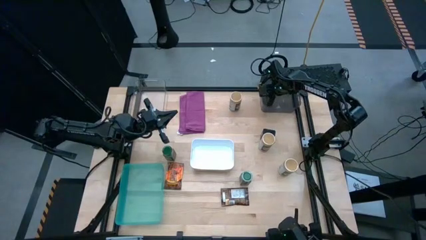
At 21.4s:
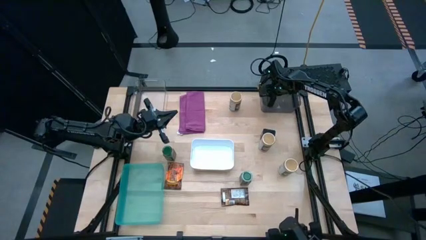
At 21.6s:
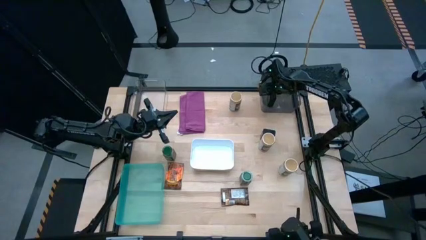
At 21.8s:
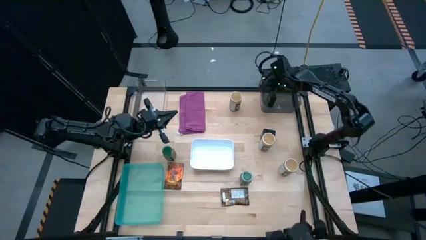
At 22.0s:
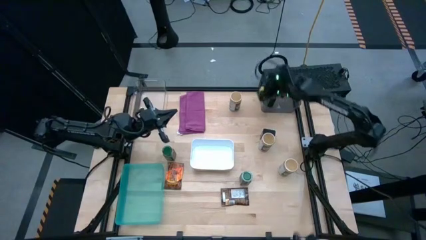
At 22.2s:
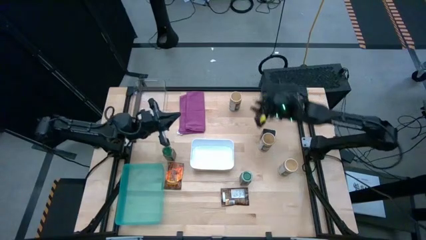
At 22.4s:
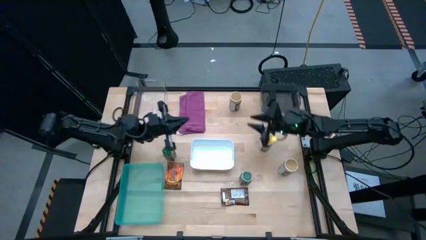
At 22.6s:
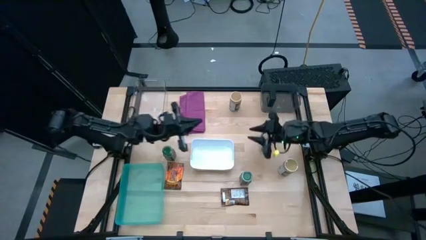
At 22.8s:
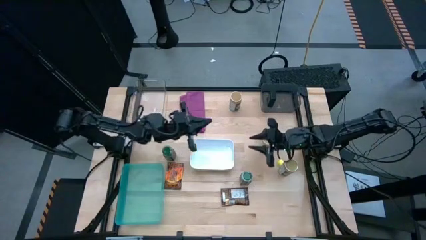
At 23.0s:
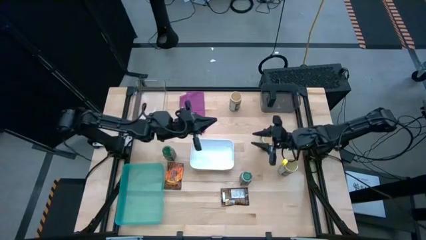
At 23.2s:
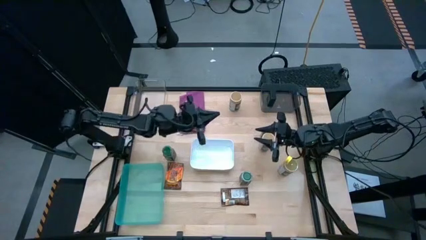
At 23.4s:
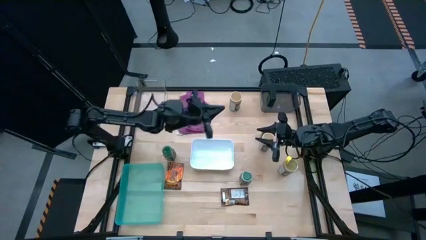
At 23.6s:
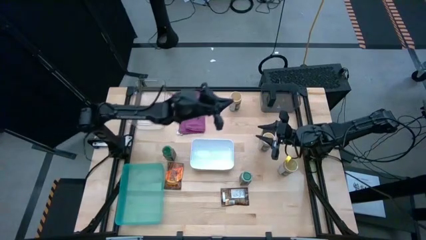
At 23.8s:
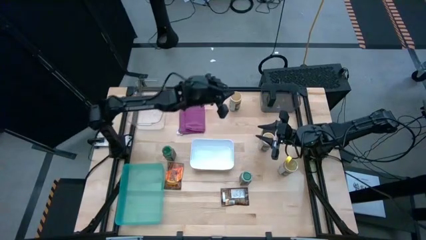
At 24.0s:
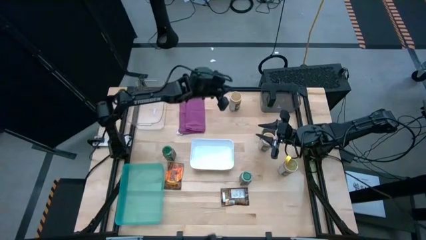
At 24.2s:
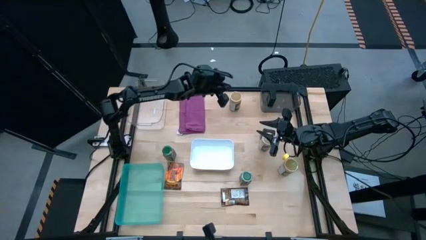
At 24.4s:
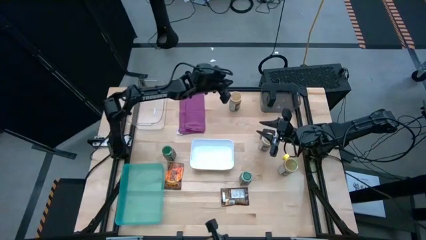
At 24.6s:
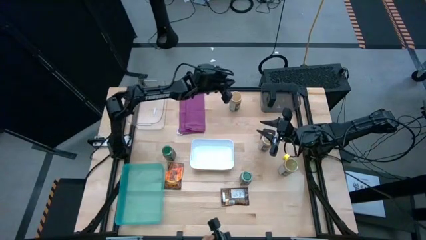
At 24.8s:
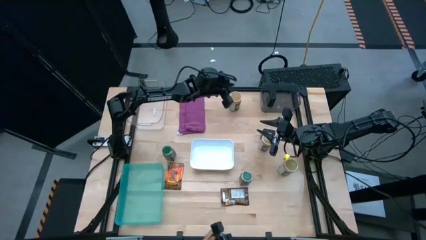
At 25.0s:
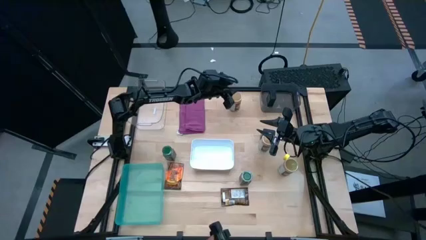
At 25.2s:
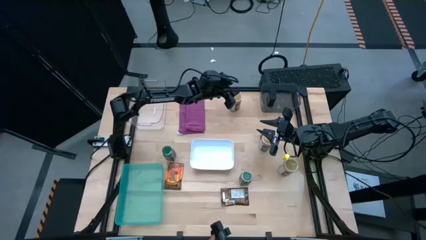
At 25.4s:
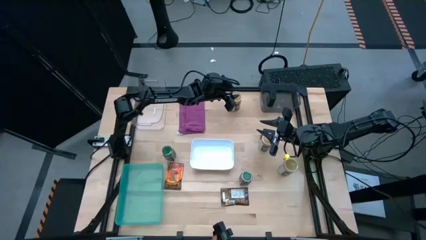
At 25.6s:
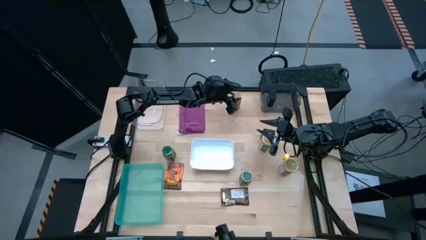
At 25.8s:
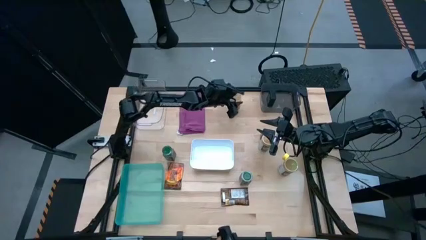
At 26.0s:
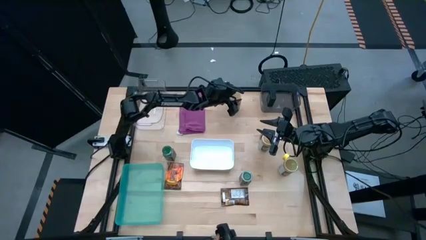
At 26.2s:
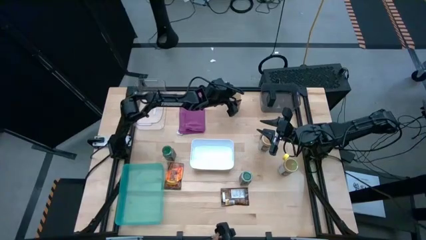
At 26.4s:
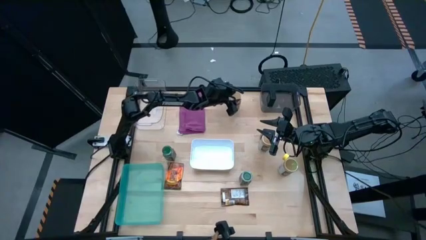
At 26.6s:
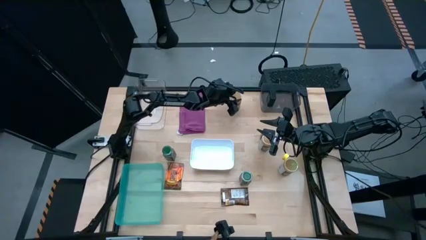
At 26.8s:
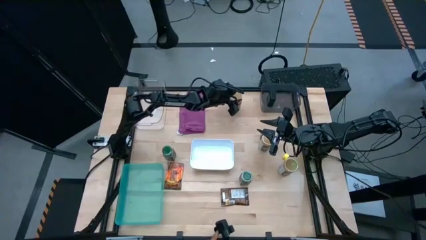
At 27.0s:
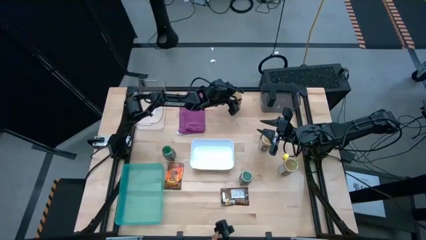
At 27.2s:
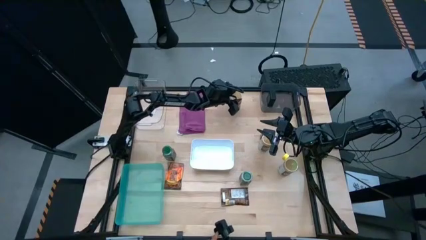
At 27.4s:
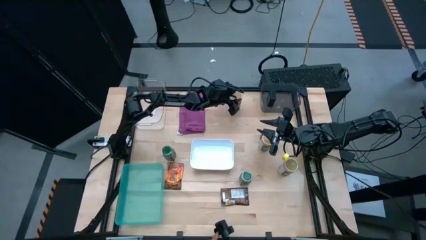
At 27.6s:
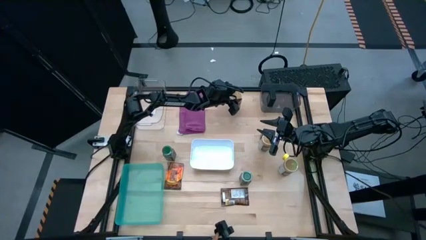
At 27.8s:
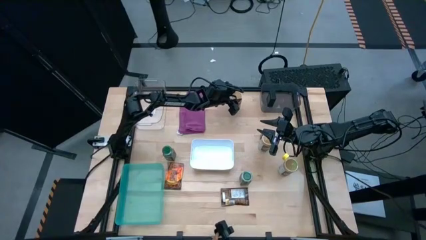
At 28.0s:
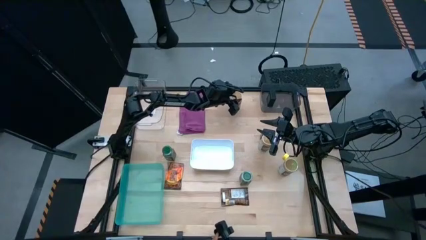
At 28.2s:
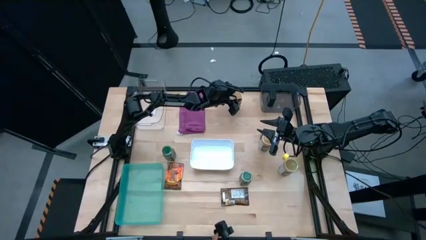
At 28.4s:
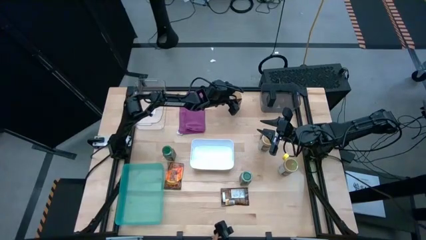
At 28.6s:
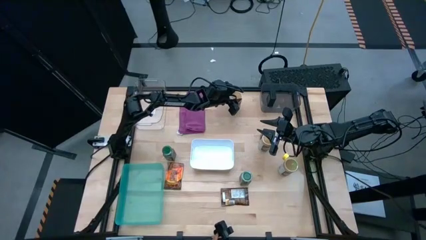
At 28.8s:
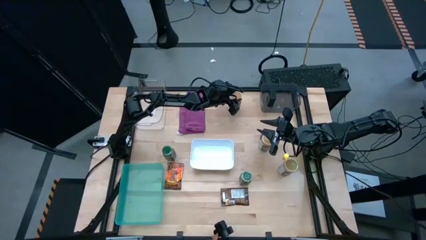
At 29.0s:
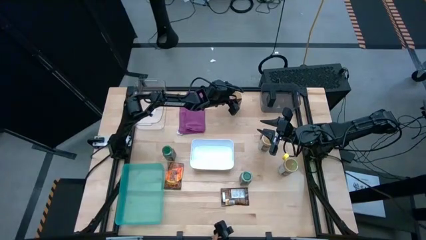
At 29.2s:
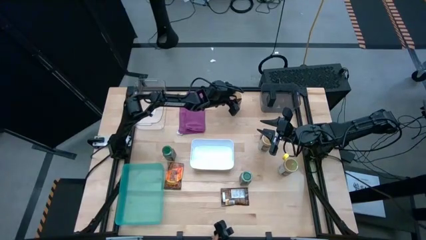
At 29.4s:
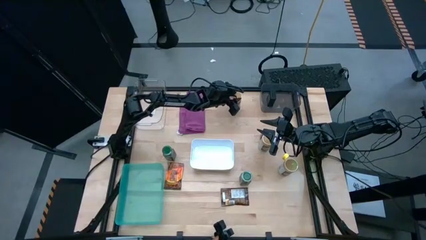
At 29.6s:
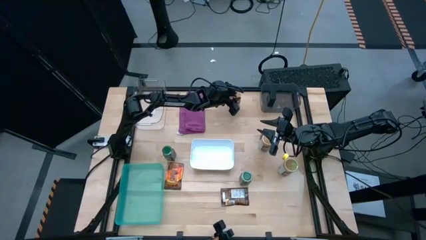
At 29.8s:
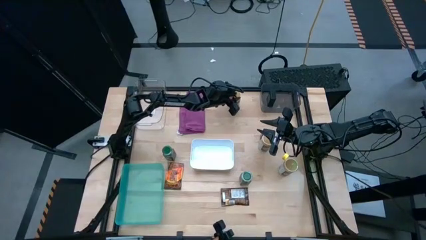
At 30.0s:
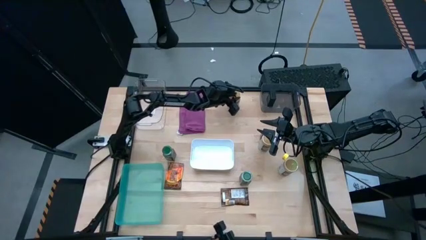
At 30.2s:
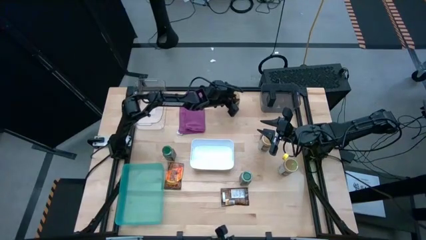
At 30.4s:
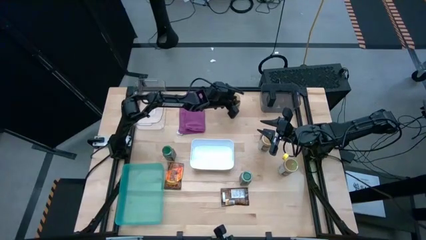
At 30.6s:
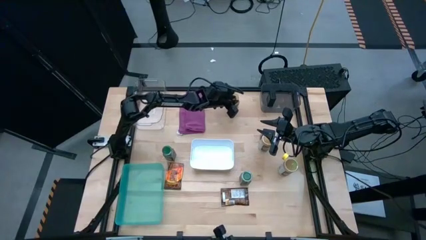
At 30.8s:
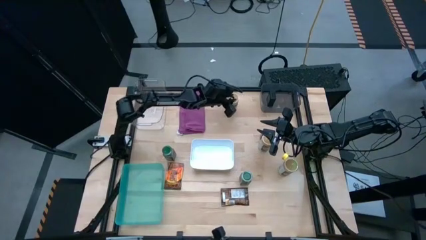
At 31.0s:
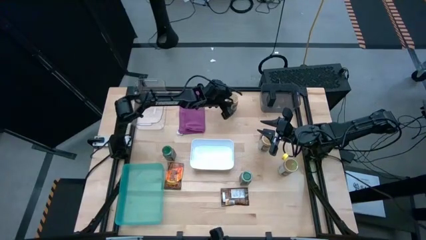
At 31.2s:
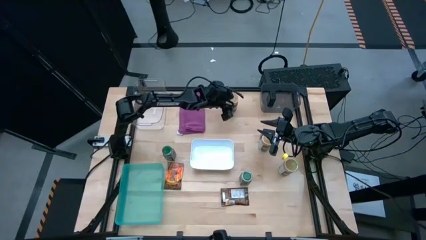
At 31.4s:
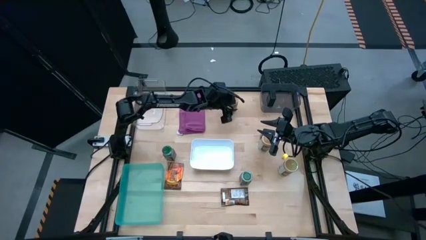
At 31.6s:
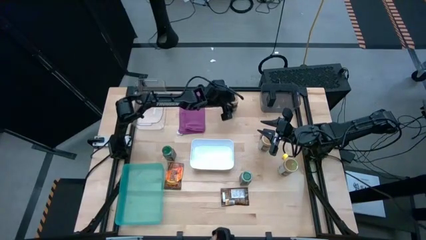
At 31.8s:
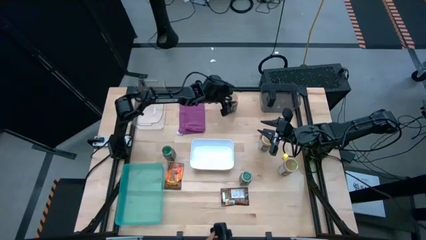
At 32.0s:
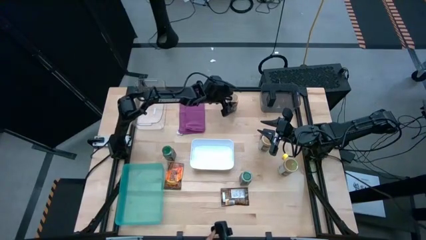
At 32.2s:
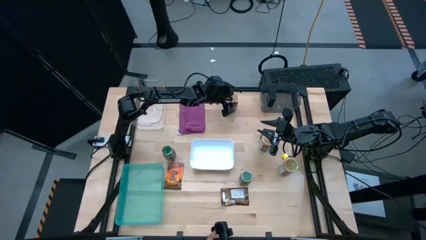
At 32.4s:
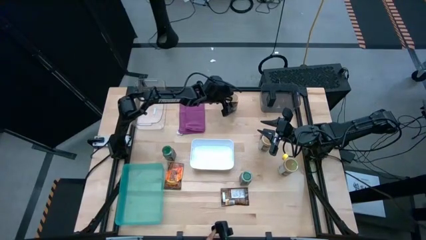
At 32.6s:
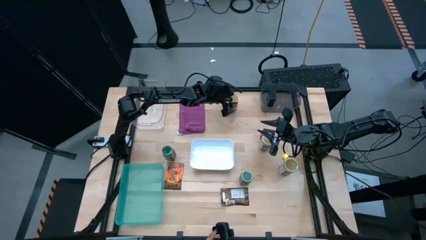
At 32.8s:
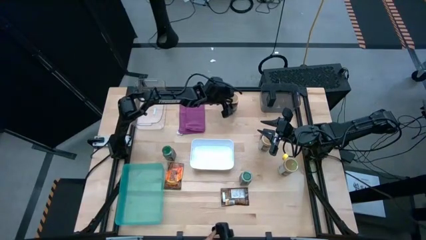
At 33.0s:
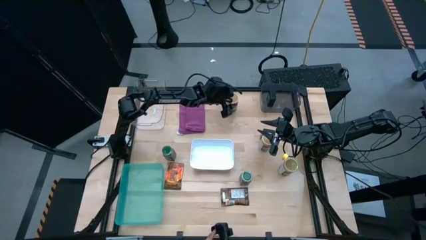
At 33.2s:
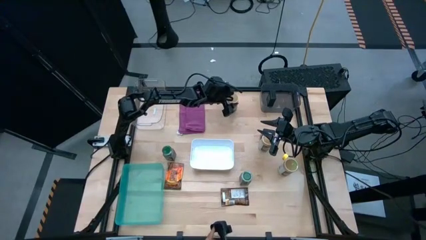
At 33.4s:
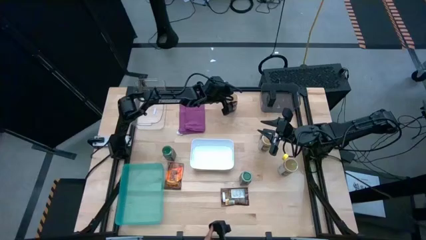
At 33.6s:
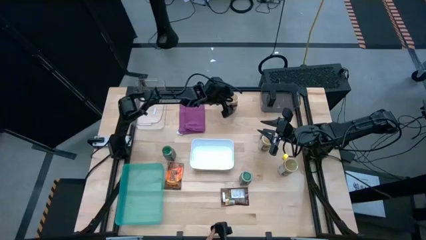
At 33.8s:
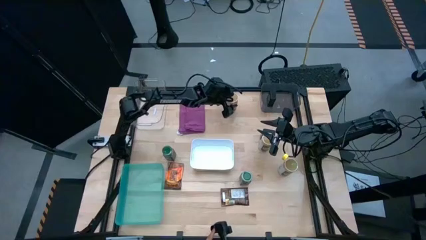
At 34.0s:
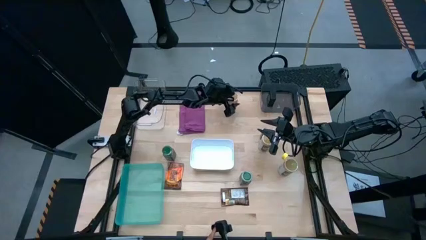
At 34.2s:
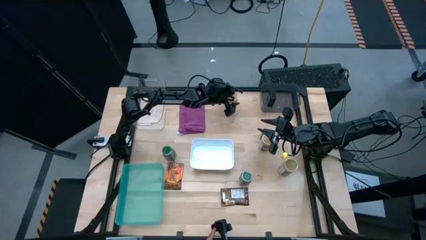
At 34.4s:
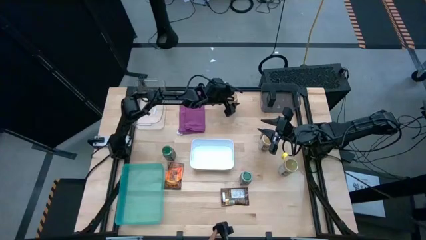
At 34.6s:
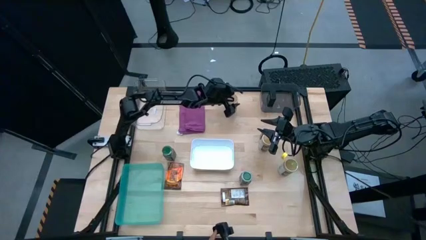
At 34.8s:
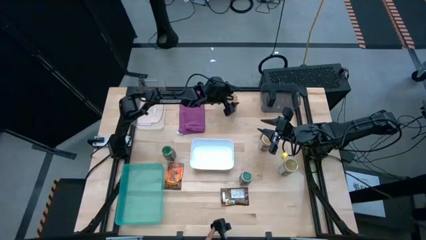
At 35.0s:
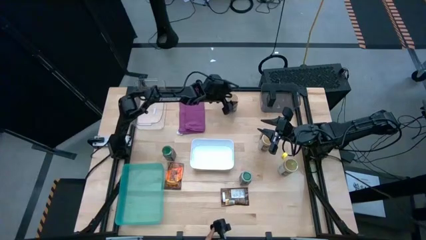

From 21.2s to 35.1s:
Task: Sort spices by type
Put the top left brown seasoning bottle into the blue bin
